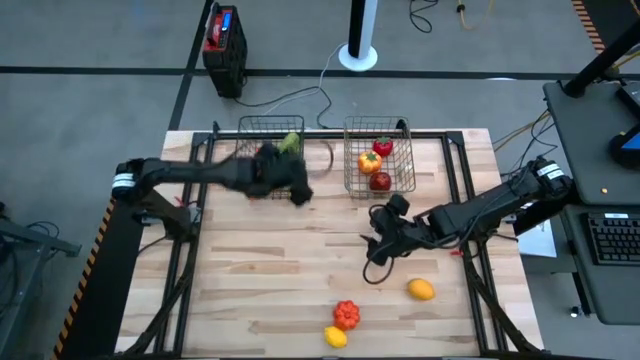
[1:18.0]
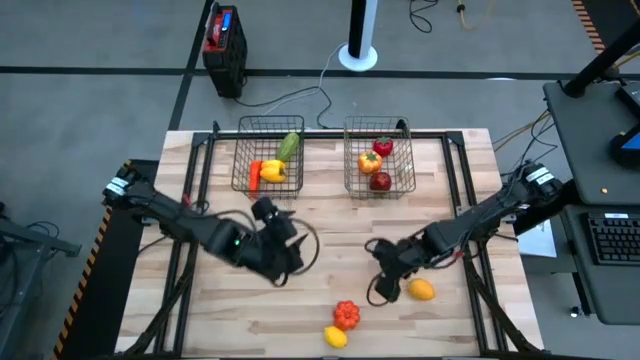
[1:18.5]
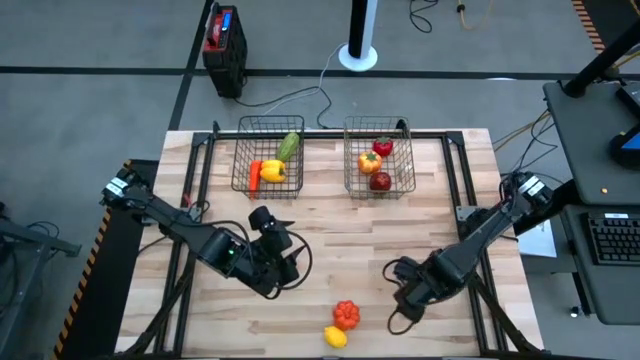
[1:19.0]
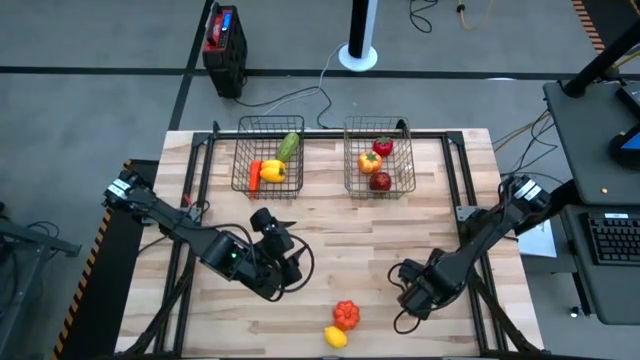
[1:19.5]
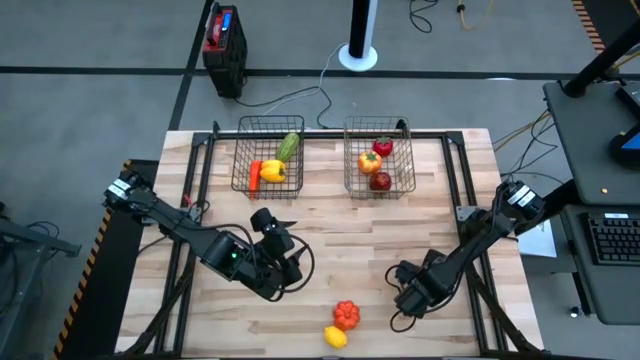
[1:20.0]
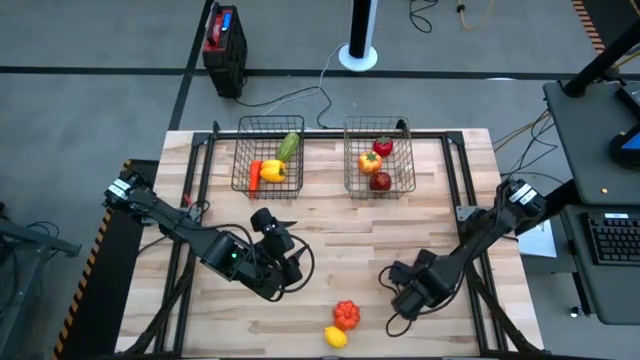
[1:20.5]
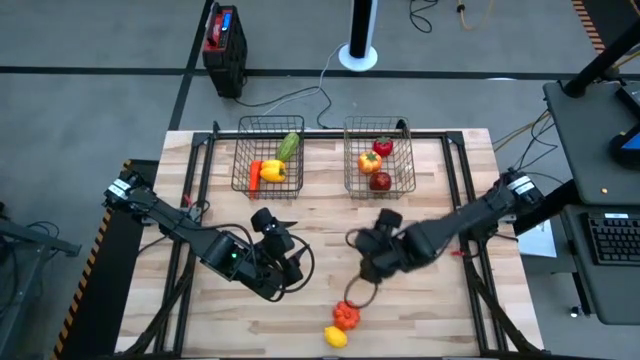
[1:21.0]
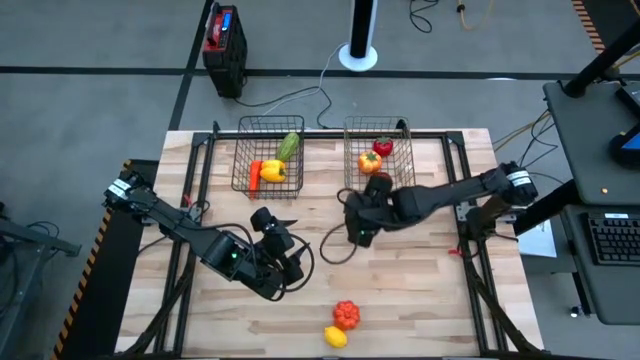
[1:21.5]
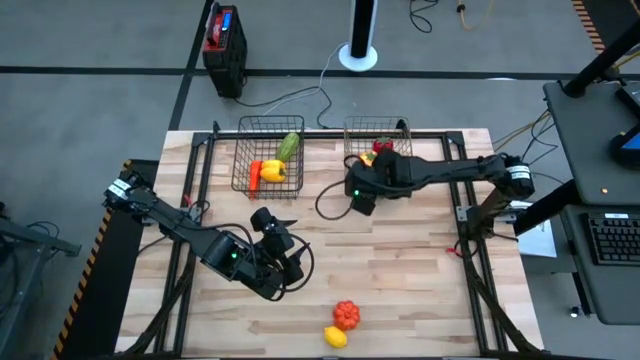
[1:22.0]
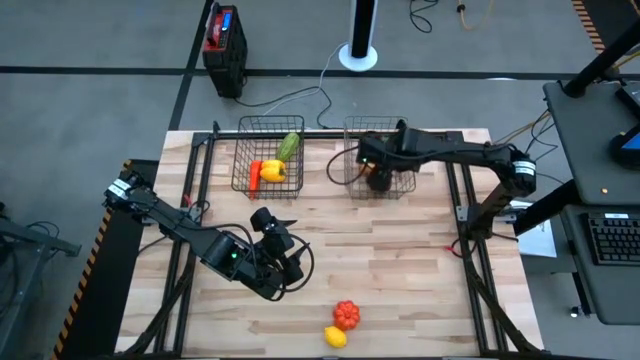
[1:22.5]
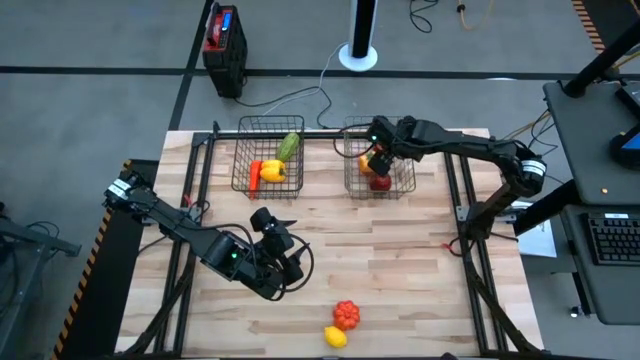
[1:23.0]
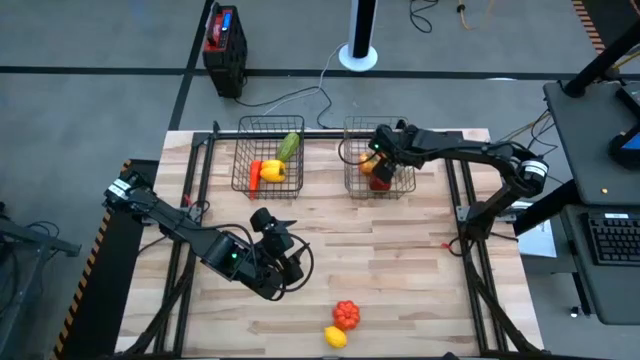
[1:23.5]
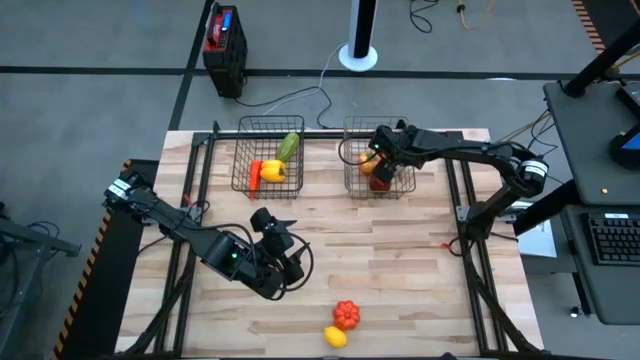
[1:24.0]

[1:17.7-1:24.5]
Task: Sort produce into baskets
Put the top yellow lemon into the gold wire basket

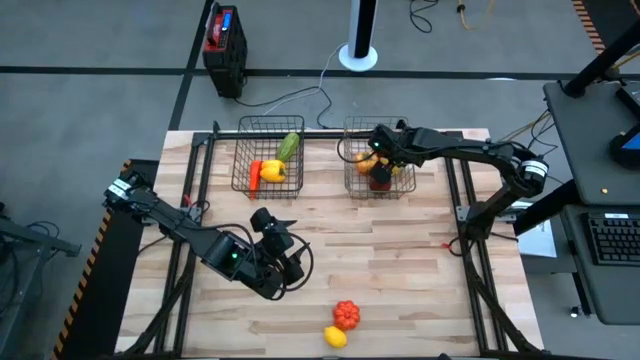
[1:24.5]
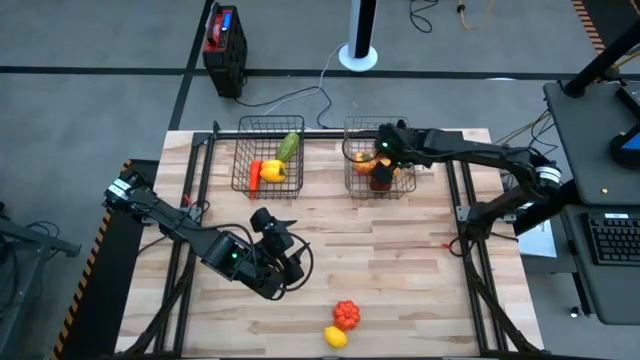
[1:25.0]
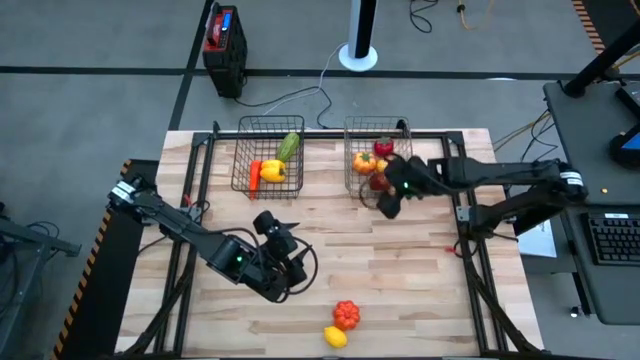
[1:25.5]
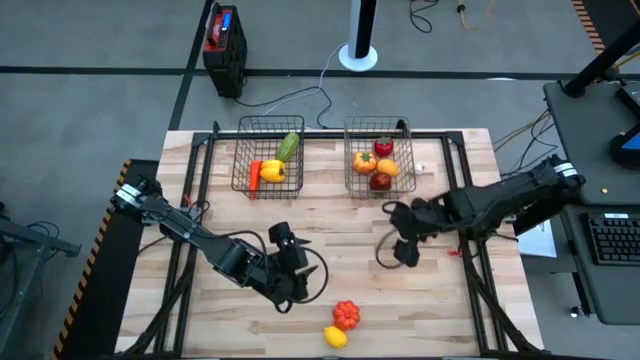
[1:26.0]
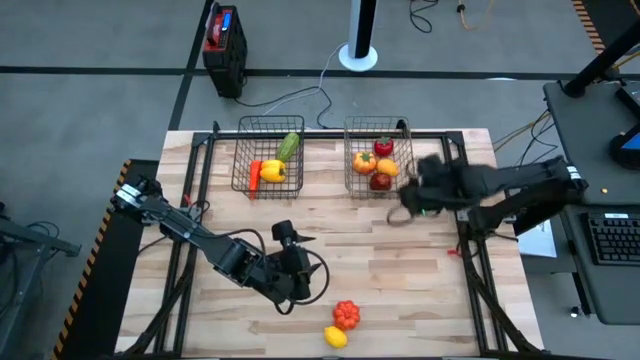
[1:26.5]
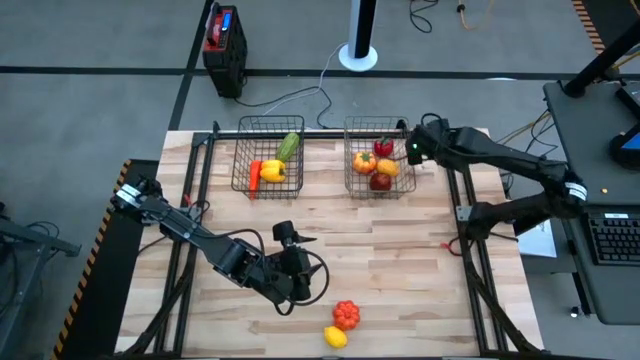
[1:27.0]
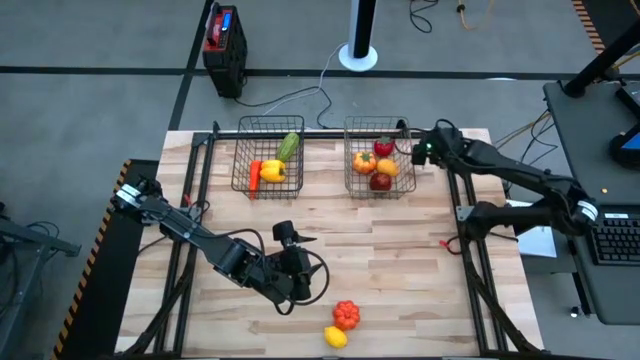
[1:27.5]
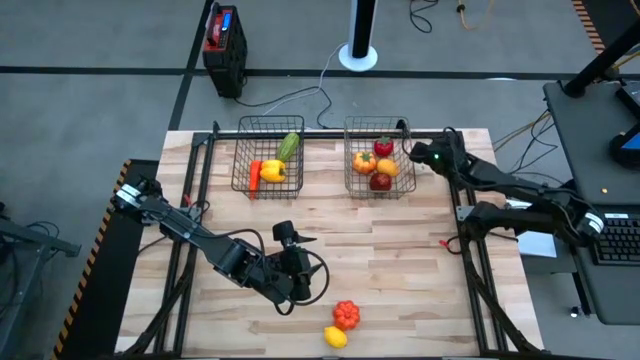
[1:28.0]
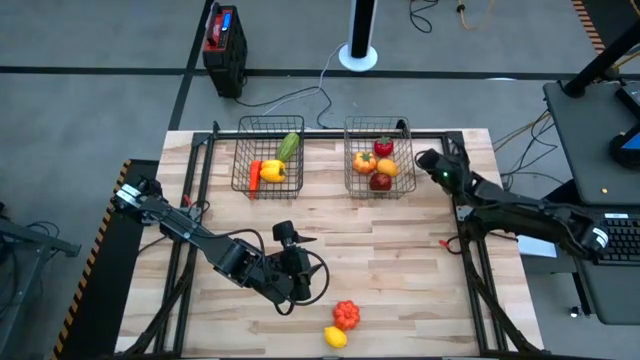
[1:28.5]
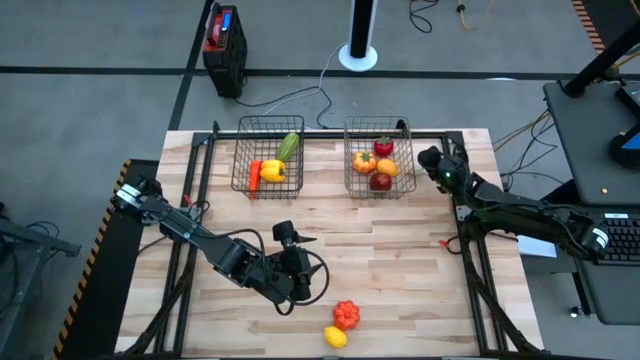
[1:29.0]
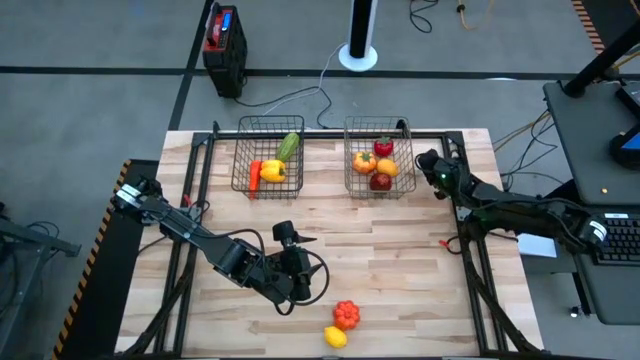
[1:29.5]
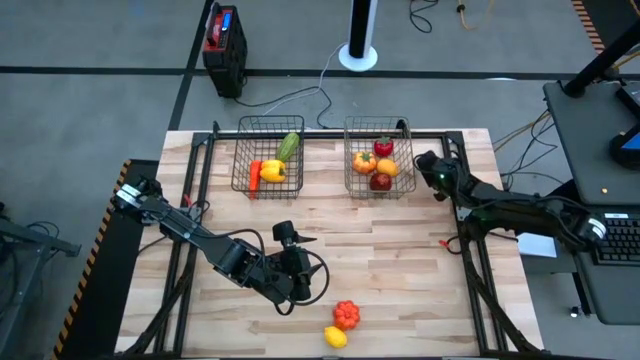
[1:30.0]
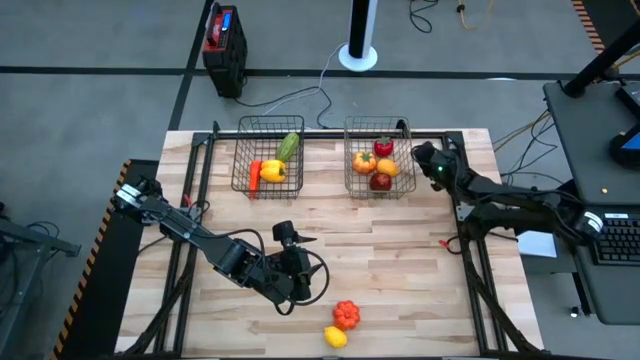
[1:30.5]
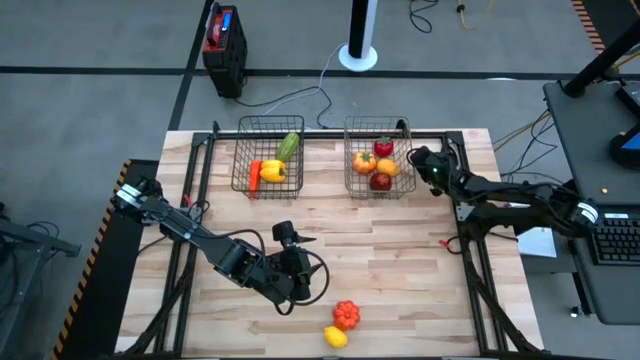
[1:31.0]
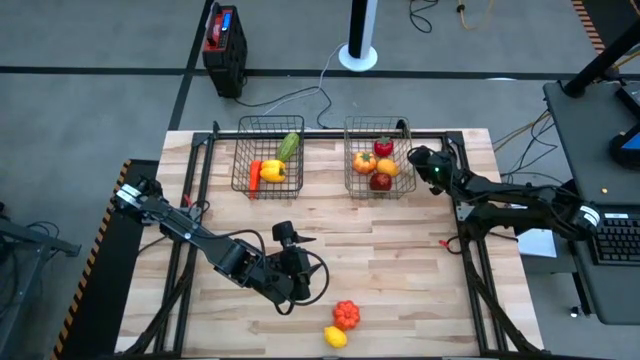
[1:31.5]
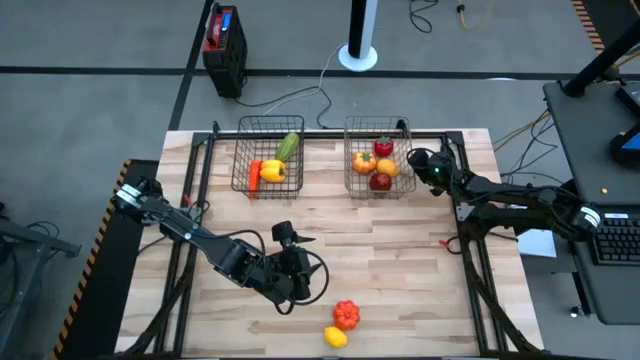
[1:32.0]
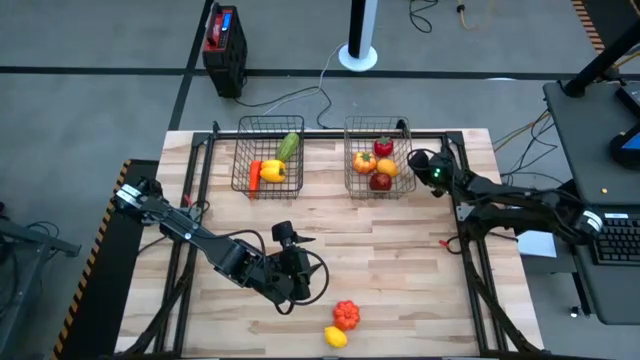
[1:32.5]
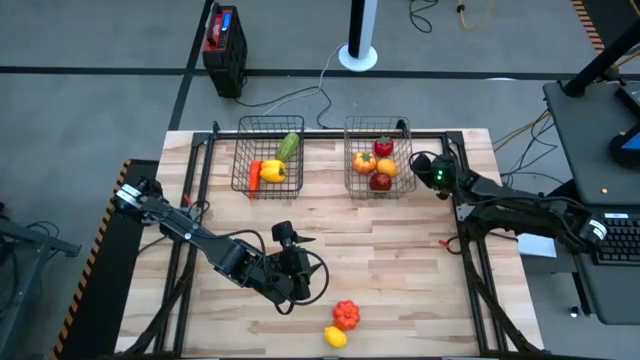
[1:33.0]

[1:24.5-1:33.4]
Put the white garlic into the black of the wire basket

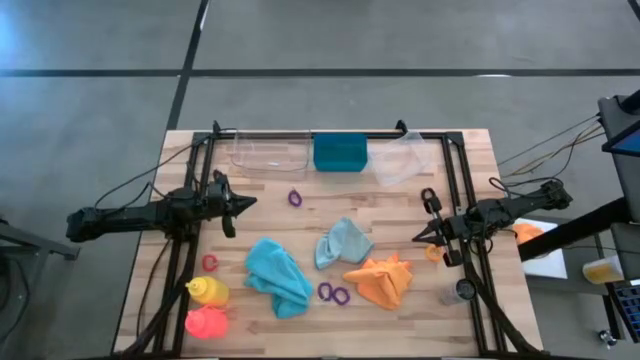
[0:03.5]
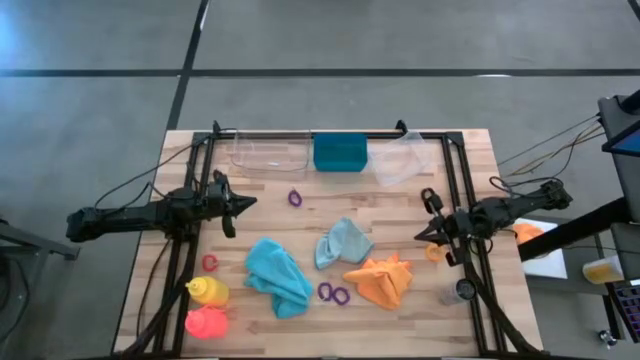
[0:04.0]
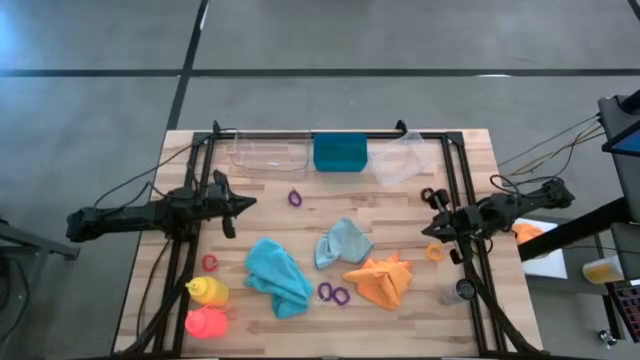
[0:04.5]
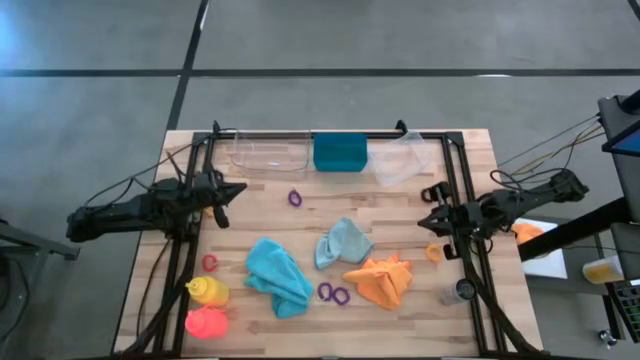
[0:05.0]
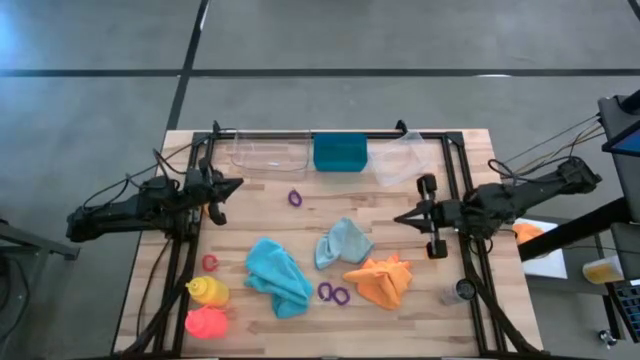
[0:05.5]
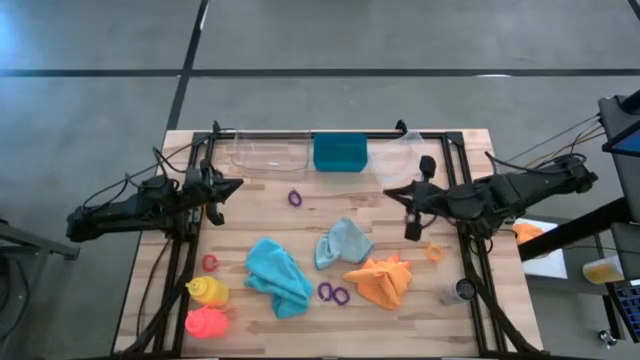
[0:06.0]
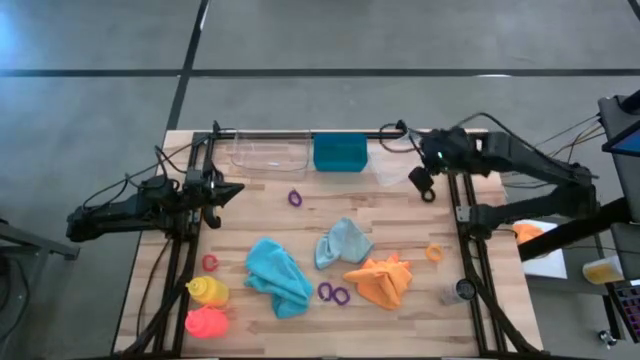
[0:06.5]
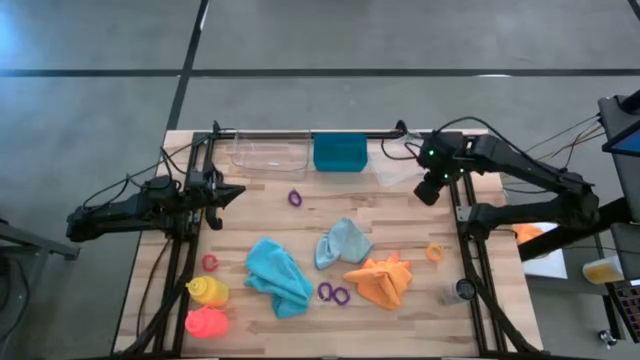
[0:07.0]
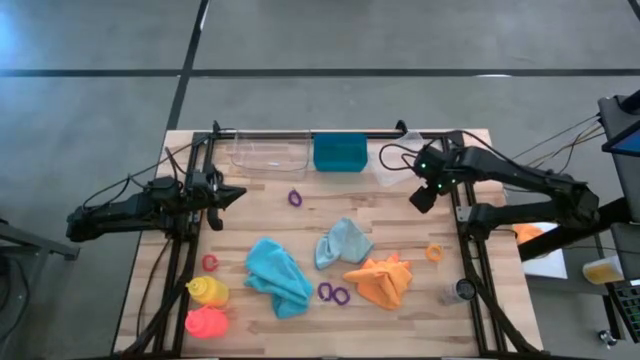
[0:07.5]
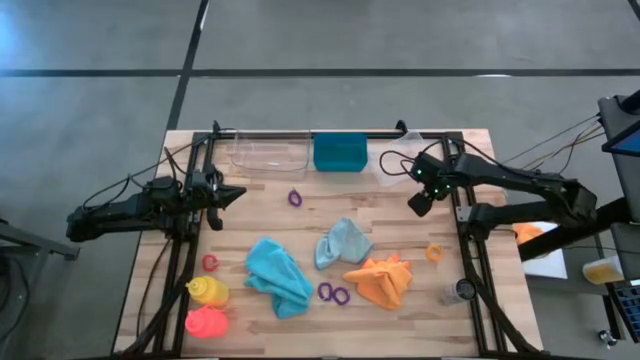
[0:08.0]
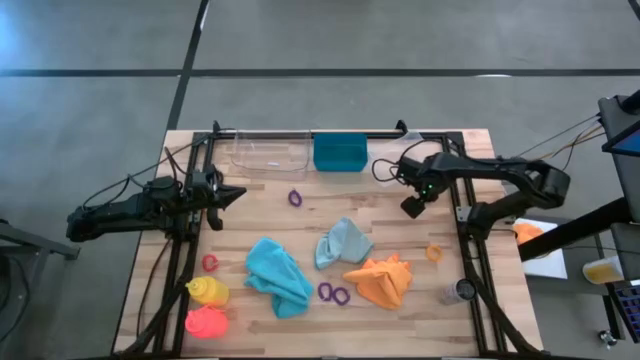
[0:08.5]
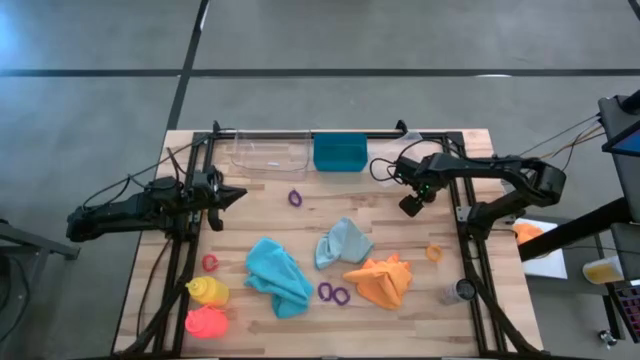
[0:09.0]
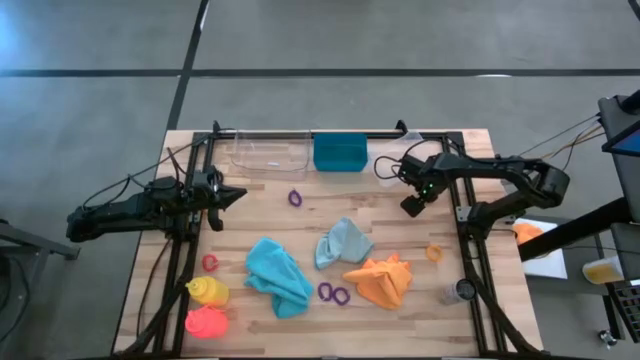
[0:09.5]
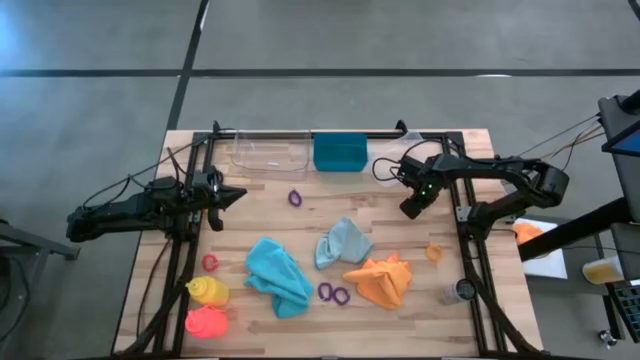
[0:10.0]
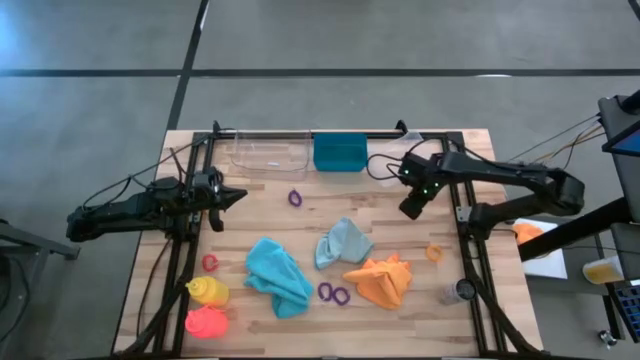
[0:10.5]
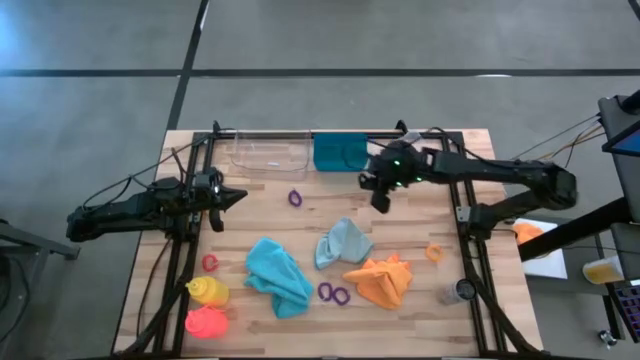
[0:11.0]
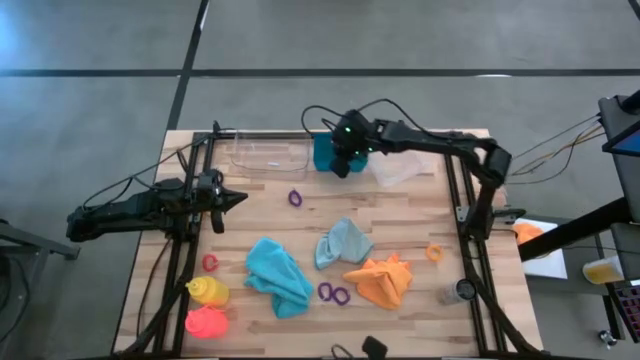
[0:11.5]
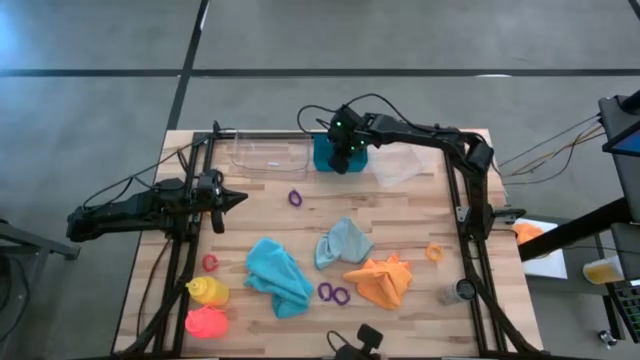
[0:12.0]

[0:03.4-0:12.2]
Task: Pick & Place Sports Items
Put the right black spring keychain into the blue bin
